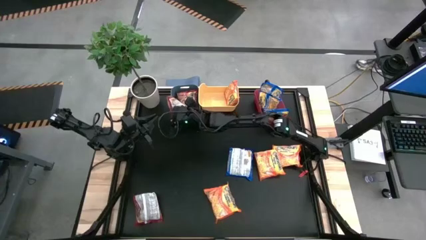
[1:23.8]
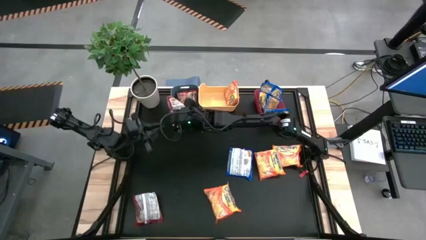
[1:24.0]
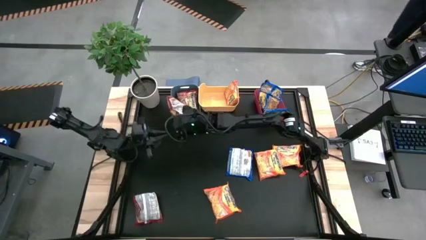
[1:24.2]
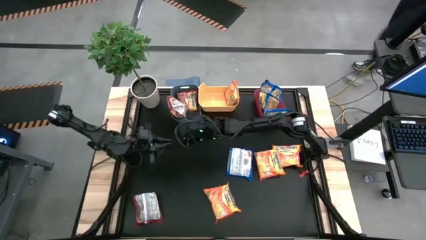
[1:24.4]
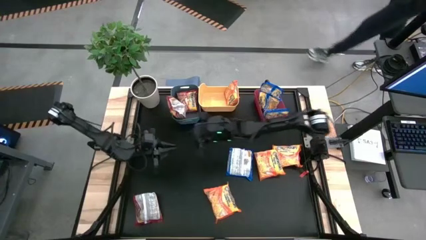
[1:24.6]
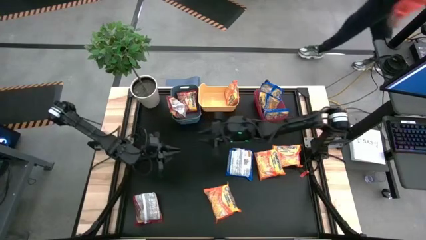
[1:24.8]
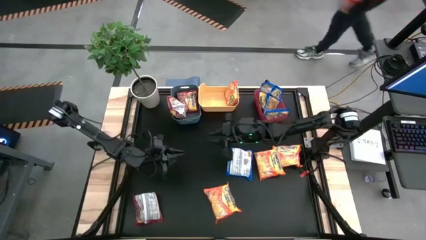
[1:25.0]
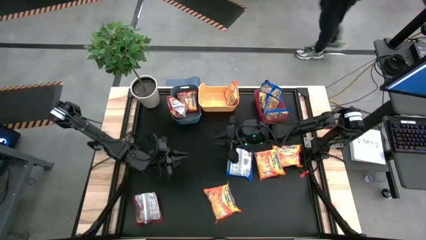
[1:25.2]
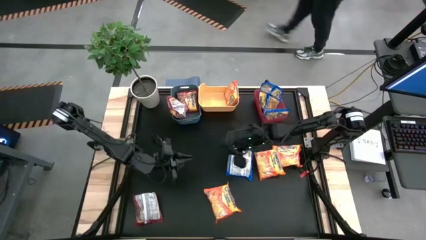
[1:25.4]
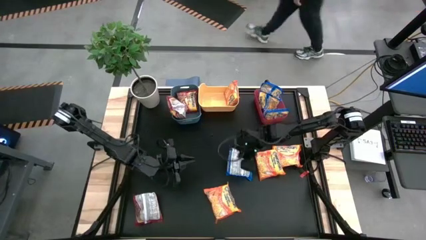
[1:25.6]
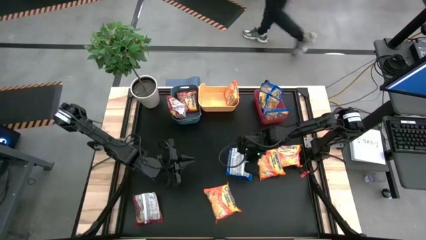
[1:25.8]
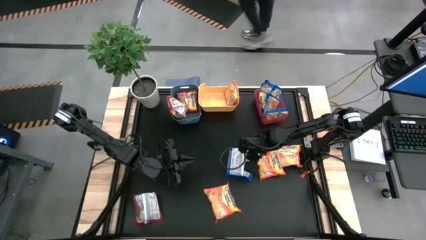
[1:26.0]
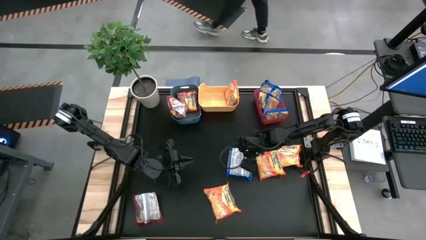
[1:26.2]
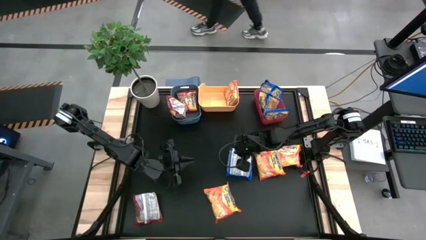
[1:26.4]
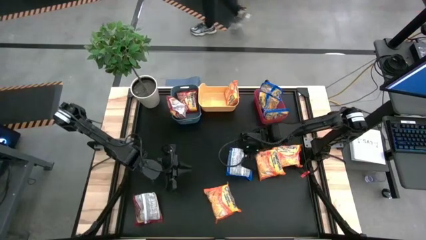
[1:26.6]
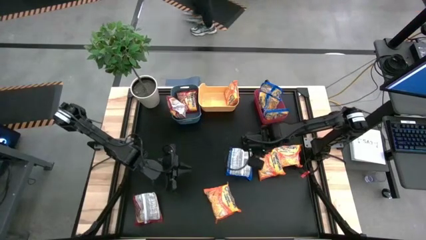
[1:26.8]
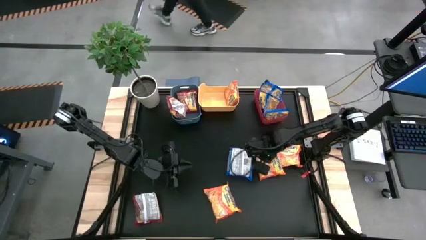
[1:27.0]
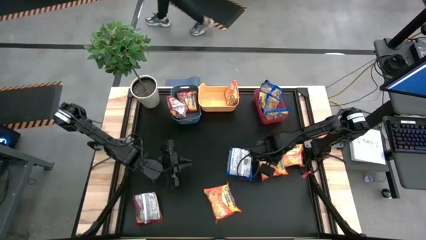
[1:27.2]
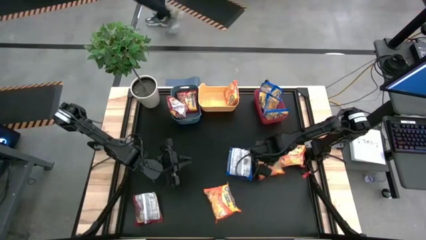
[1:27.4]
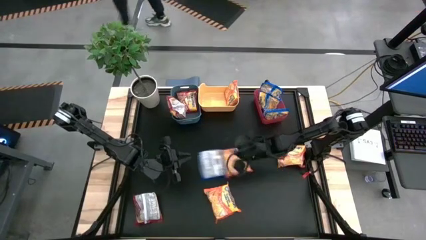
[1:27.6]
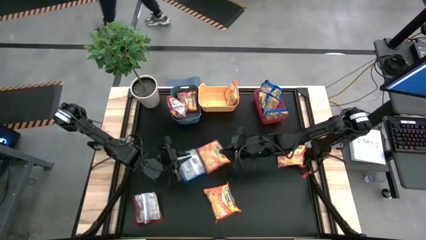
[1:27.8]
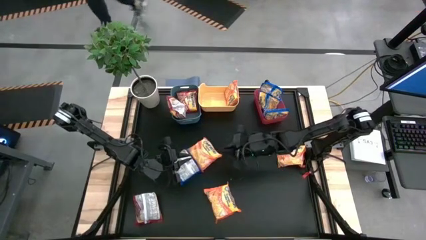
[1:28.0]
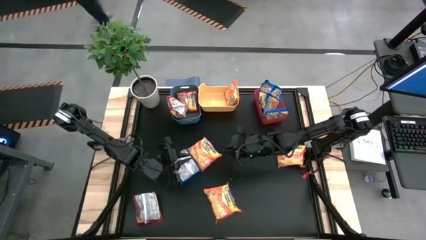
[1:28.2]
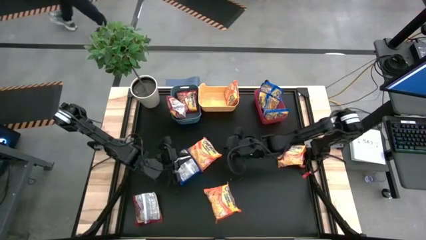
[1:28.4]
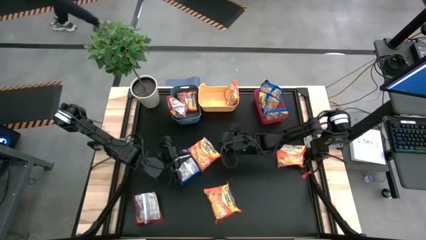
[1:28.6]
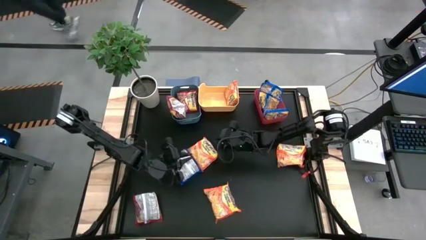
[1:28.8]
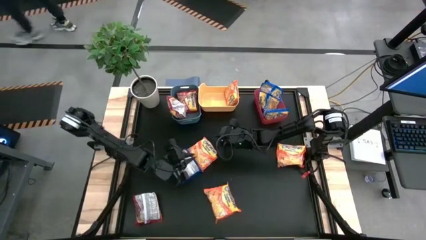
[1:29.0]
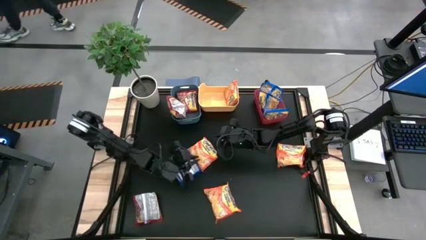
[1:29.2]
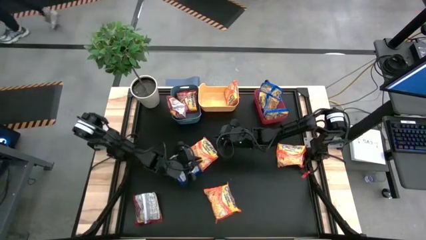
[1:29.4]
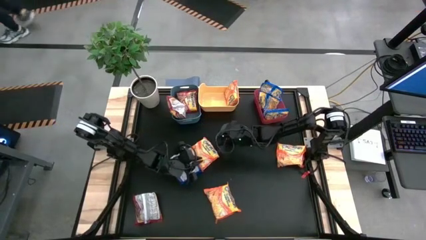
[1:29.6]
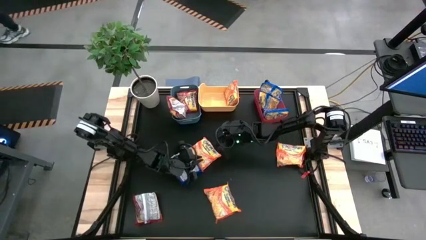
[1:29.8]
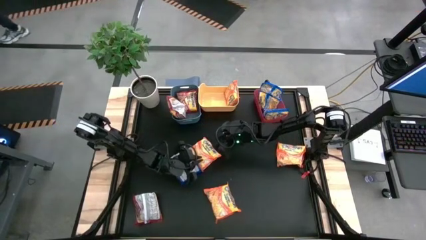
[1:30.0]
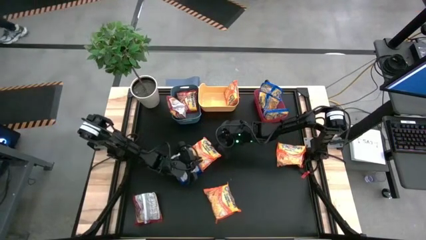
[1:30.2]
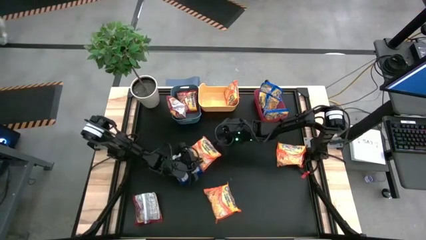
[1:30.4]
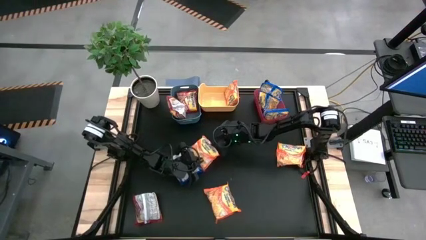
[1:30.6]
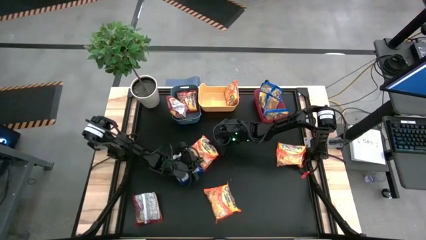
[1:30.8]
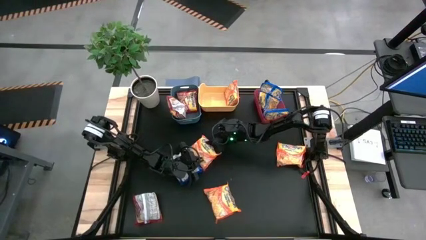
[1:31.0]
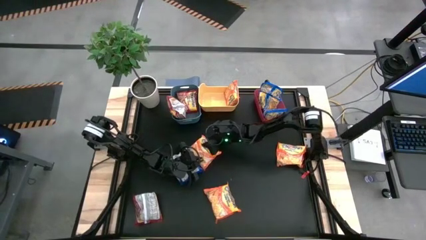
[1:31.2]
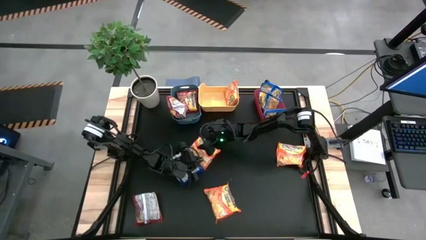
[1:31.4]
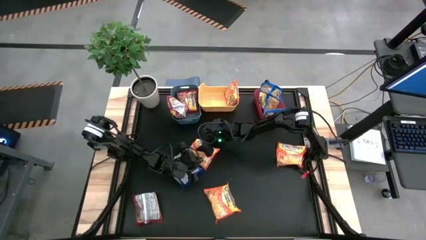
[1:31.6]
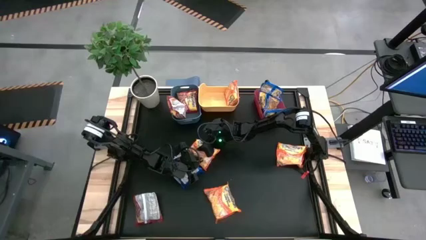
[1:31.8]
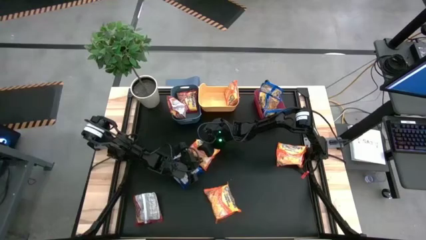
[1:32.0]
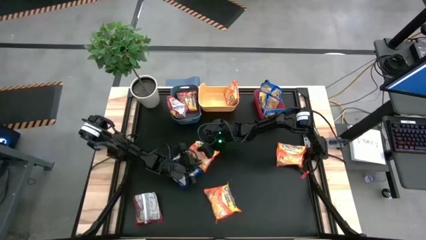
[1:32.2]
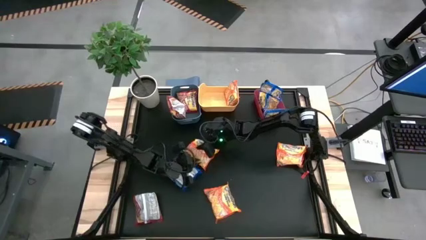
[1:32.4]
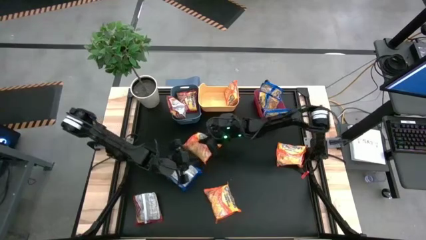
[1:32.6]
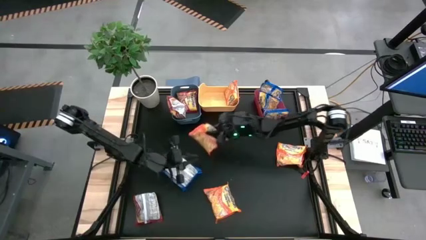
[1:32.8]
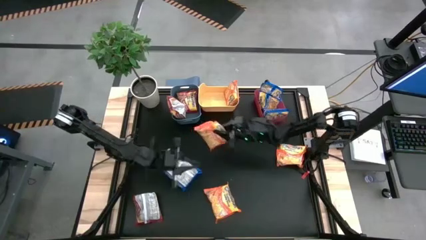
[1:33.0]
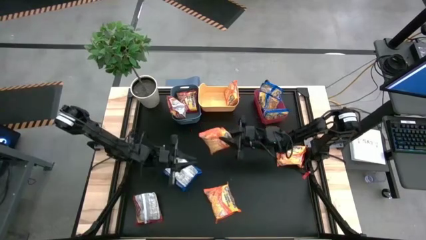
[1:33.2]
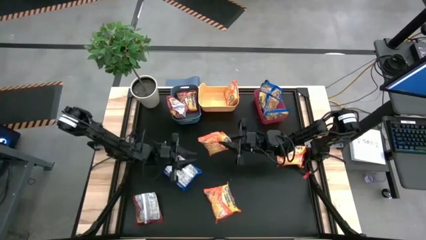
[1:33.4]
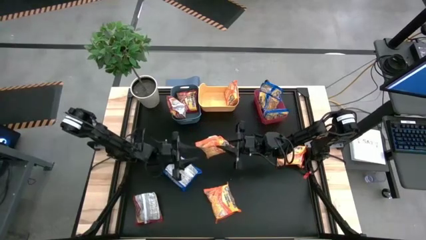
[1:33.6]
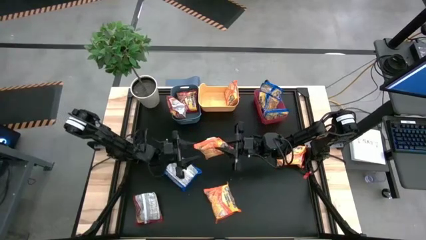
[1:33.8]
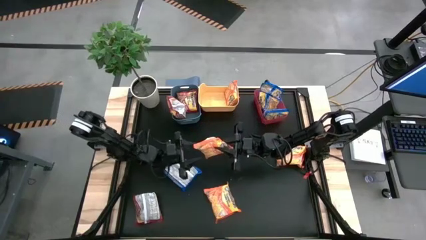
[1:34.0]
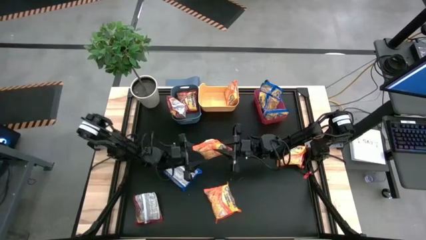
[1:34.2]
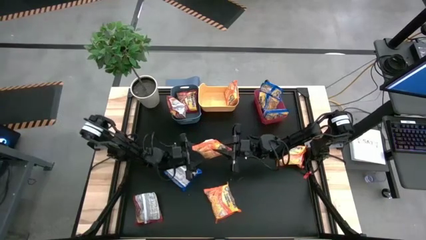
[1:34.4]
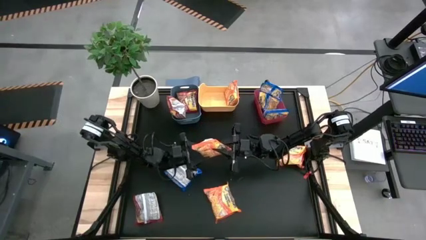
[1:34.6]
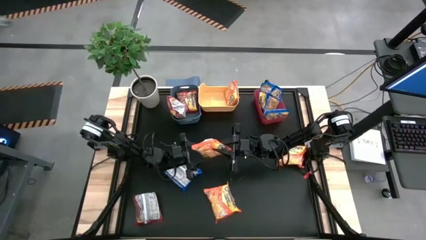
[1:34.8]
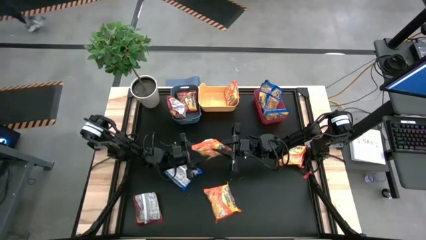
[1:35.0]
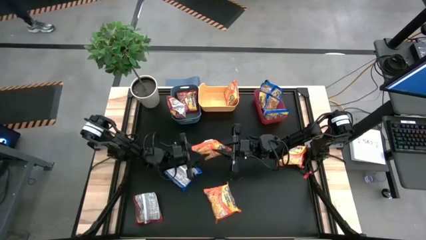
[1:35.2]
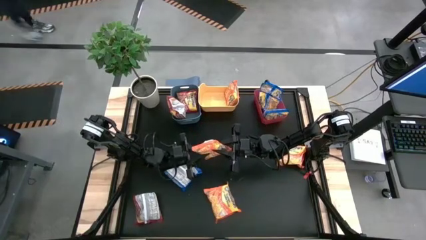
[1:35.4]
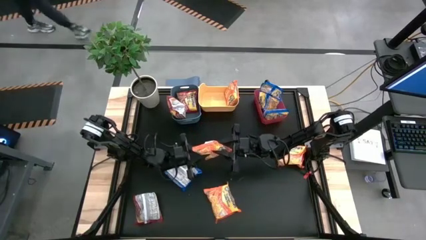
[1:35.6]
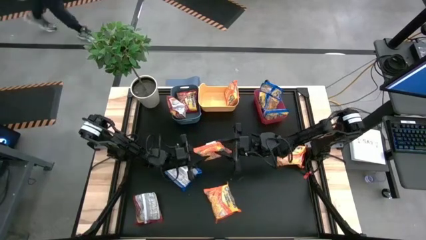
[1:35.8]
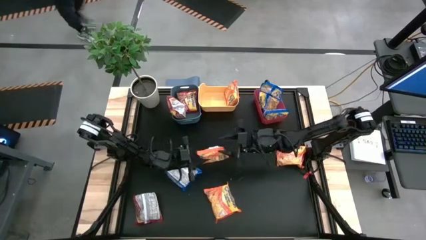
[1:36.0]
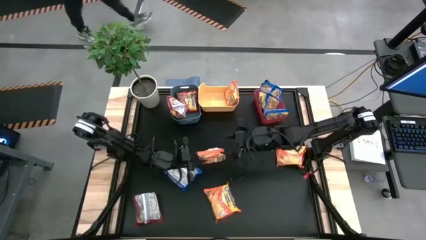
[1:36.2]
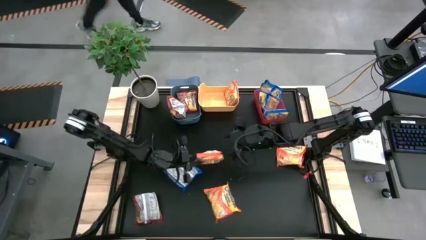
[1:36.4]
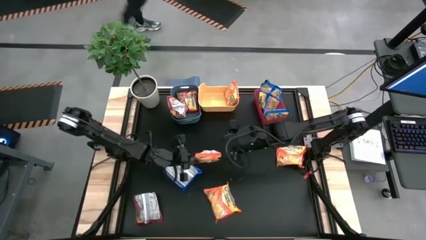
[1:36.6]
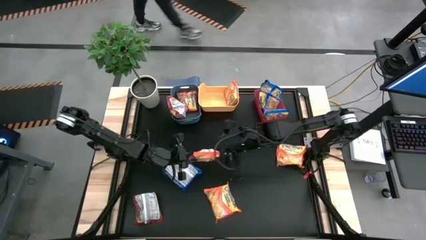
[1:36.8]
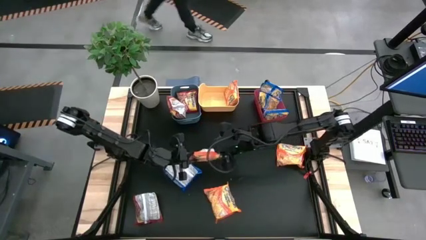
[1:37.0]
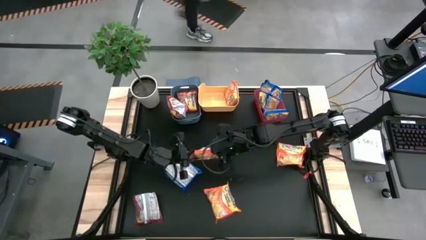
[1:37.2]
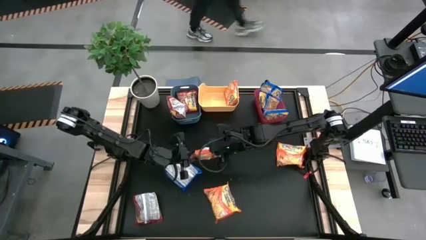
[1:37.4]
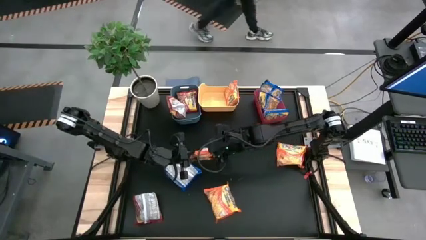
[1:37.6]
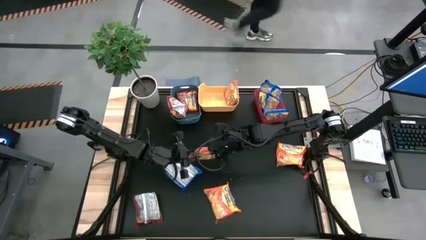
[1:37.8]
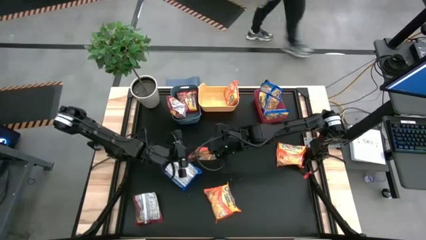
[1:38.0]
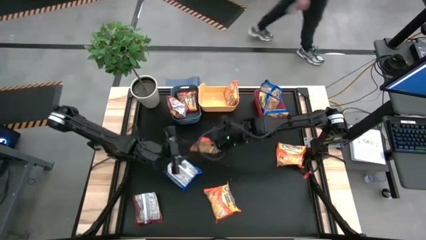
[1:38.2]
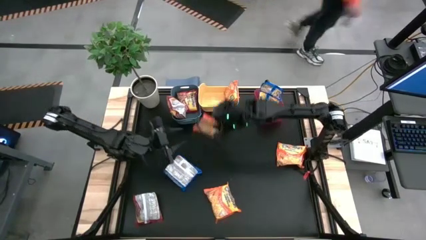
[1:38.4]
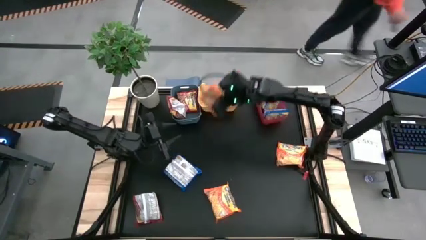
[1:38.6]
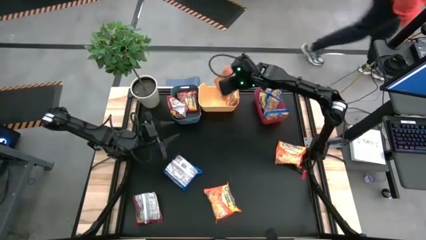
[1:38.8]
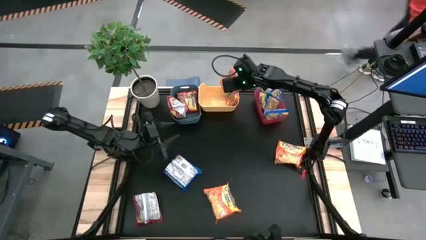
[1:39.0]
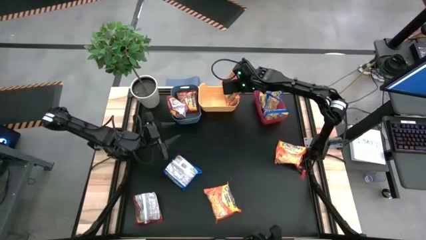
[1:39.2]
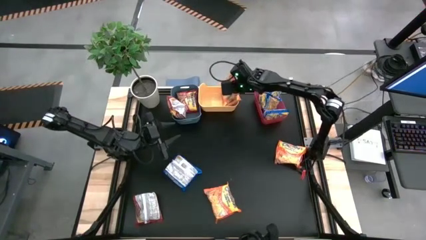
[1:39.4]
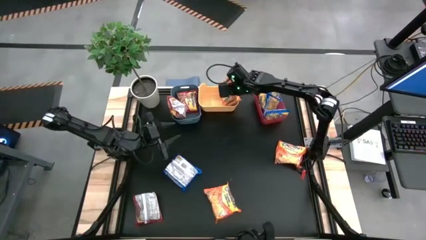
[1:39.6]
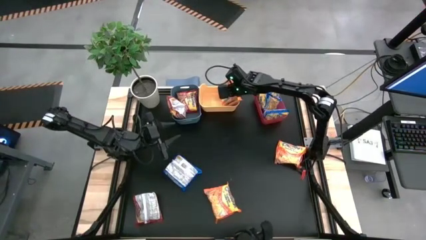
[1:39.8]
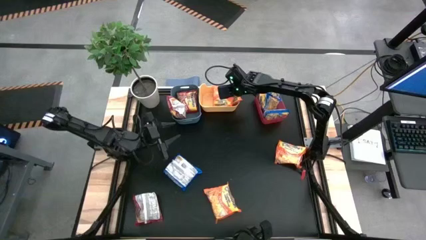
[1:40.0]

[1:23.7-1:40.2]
Task: Sort Maruchan noodles
Put the orange noodle pack into the yellow bin
